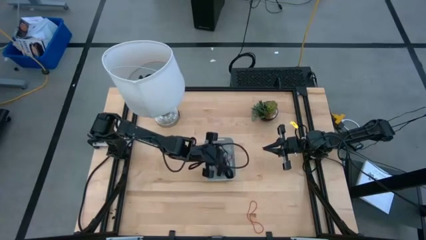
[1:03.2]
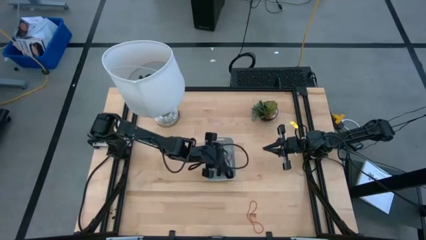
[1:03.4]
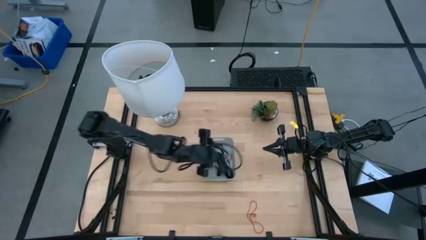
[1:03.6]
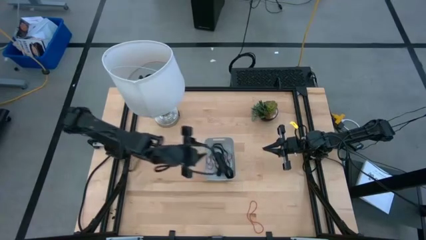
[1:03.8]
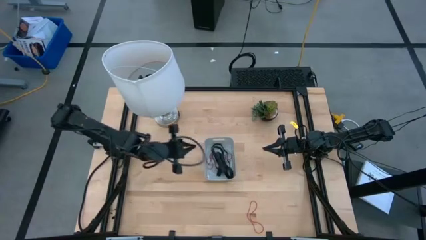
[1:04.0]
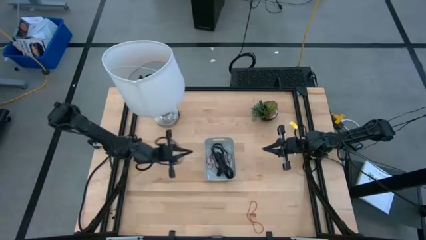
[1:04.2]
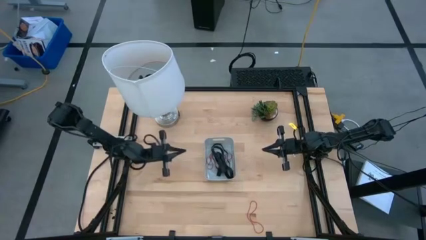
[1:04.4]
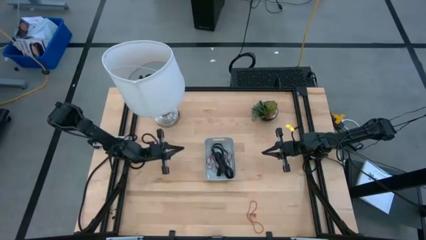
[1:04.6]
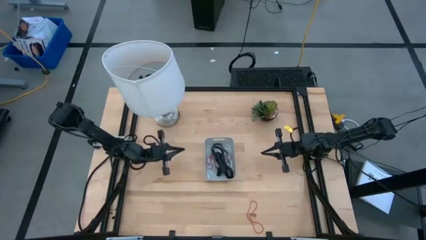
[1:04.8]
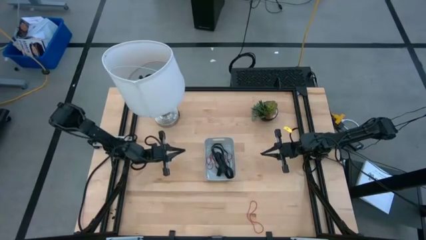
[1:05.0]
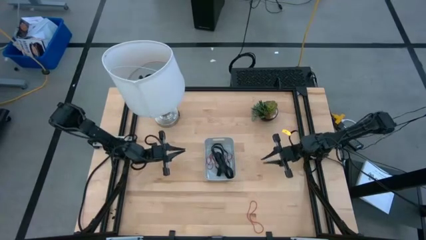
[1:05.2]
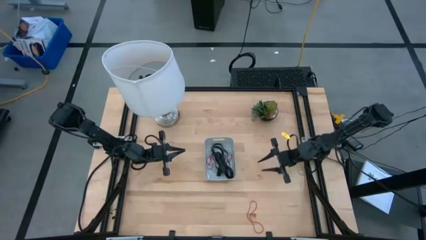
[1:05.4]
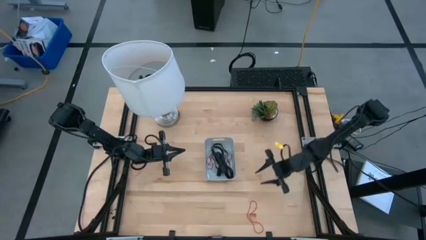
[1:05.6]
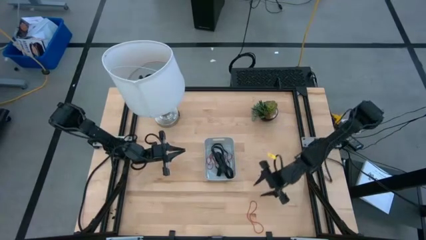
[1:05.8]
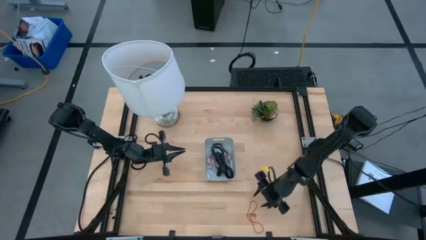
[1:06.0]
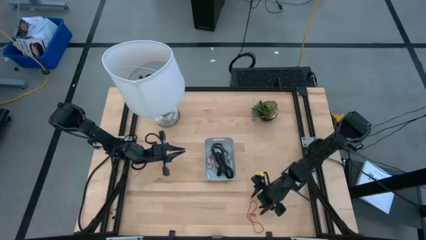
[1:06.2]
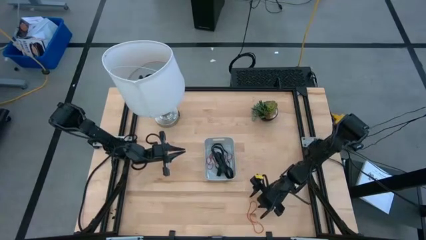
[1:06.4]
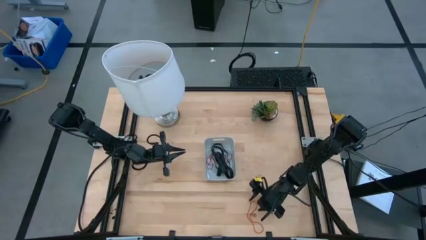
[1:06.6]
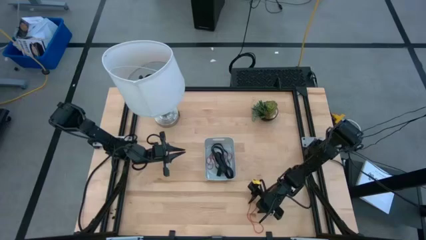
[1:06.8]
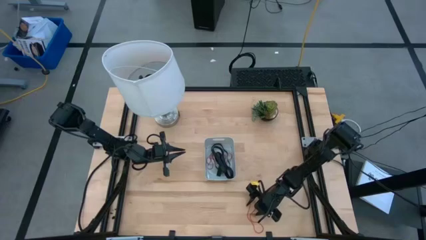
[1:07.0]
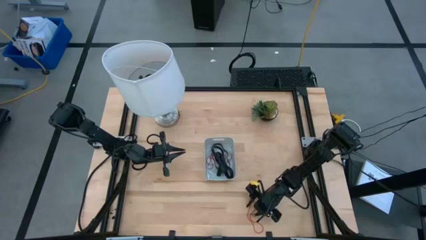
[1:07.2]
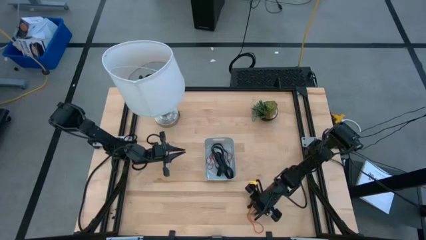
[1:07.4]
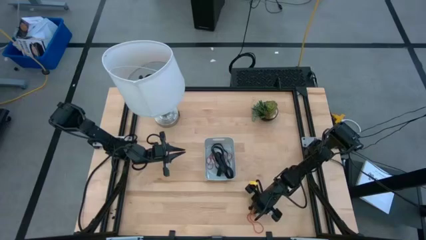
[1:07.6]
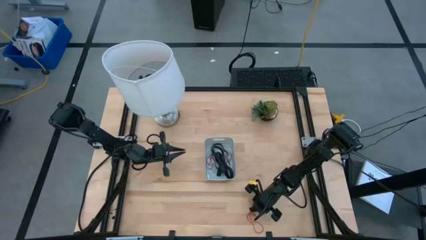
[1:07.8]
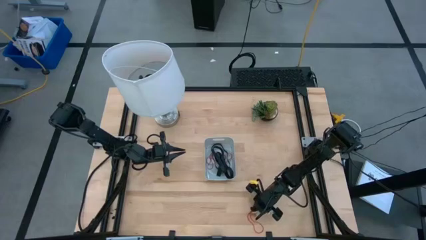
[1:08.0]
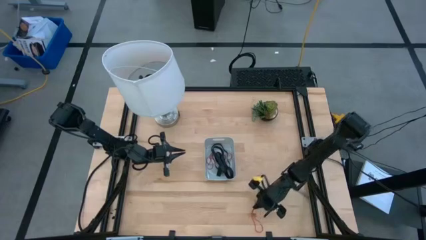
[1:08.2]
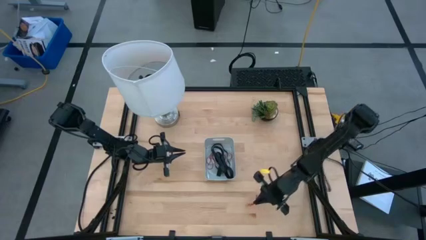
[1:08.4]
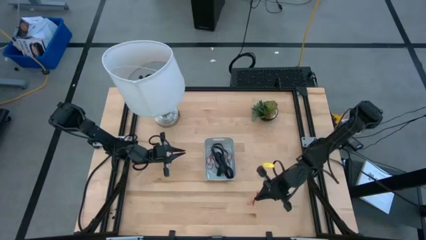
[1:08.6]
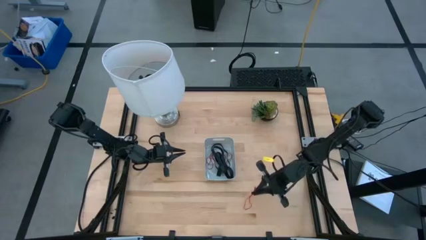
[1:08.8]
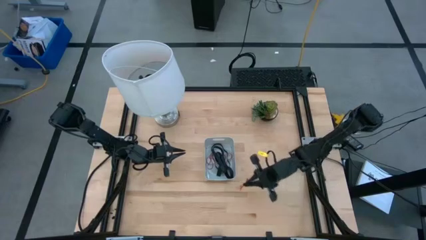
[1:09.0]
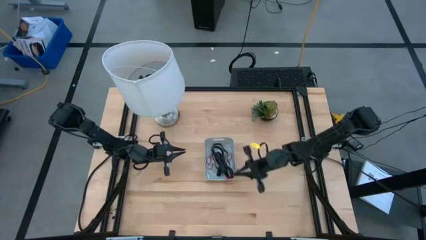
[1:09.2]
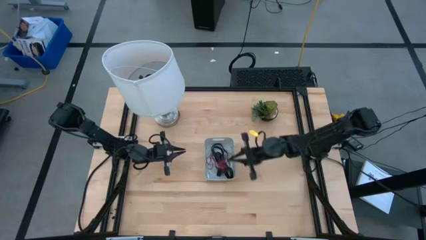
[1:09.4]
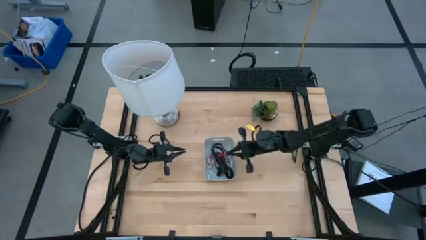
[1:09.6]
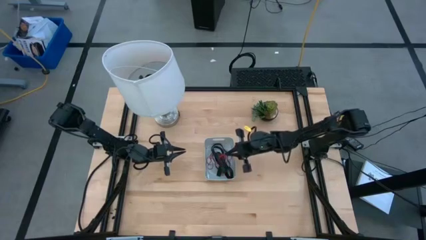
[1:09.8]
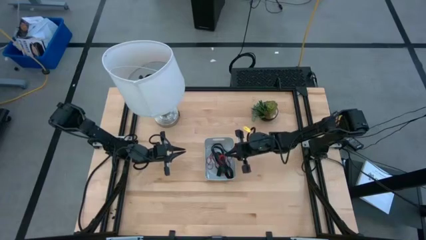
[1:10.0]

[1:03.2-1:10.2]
Task: Pick and place rubber bands into bin
Put the red rubber band into the gray bin

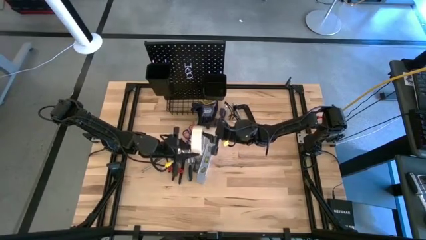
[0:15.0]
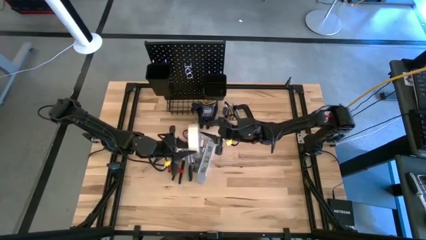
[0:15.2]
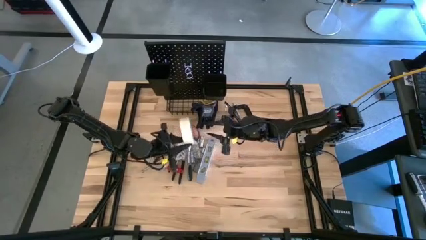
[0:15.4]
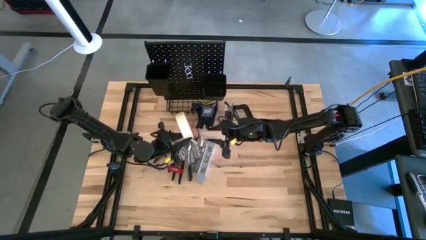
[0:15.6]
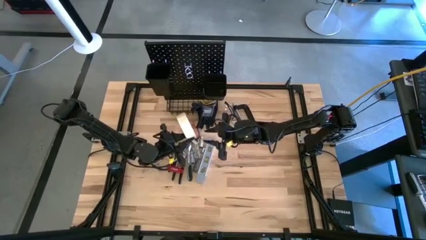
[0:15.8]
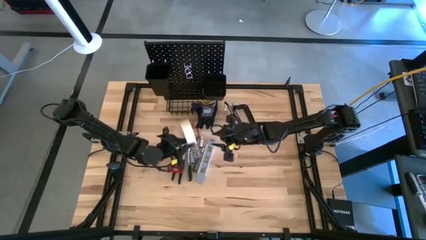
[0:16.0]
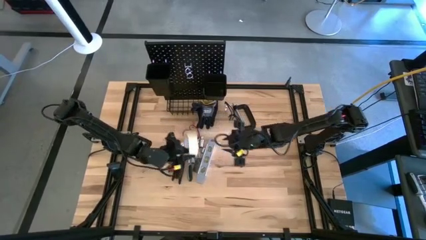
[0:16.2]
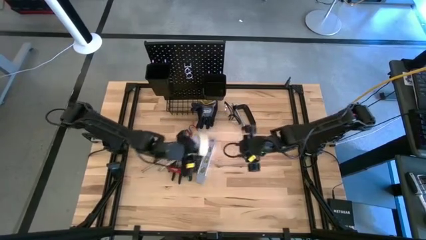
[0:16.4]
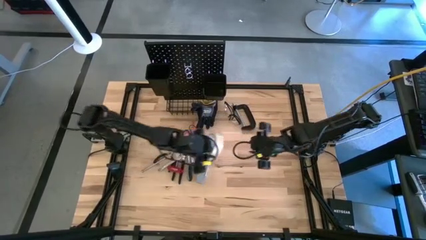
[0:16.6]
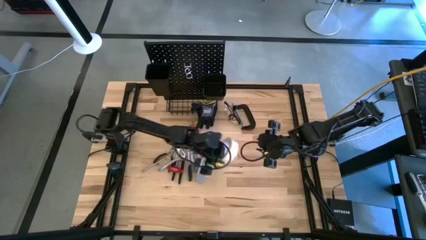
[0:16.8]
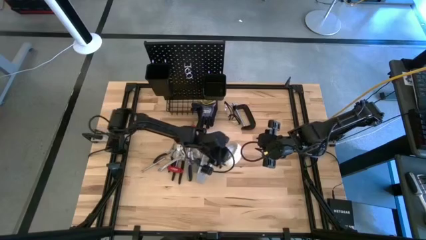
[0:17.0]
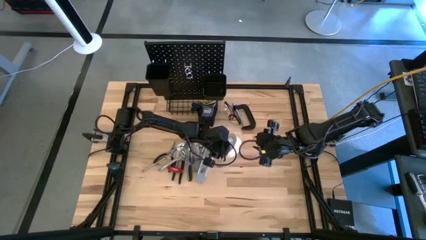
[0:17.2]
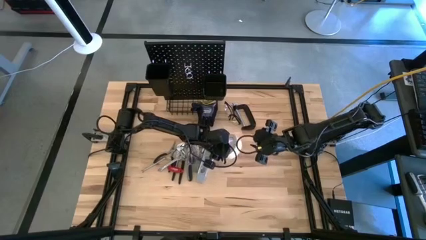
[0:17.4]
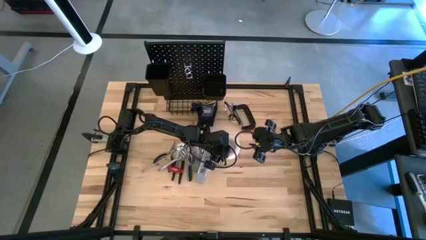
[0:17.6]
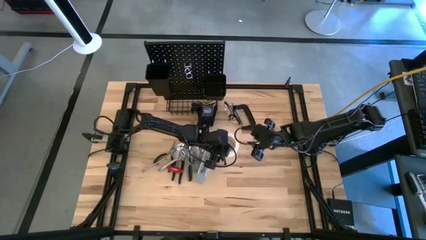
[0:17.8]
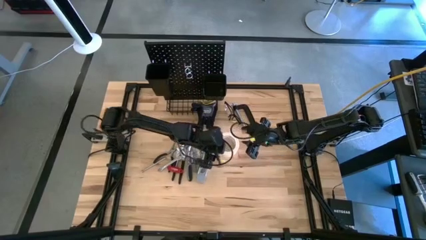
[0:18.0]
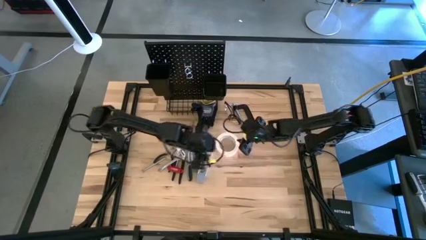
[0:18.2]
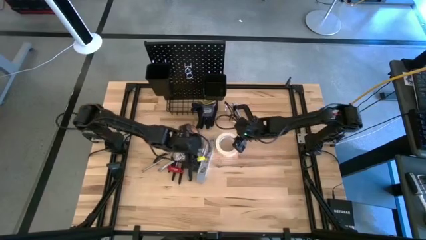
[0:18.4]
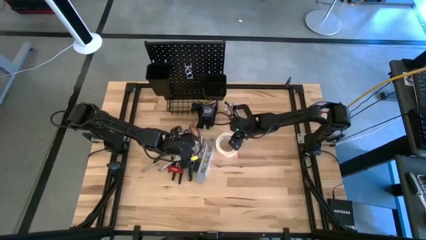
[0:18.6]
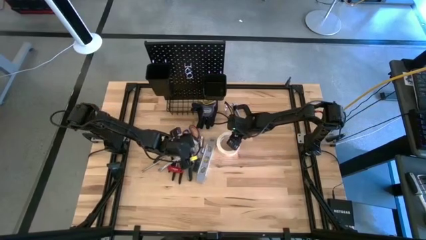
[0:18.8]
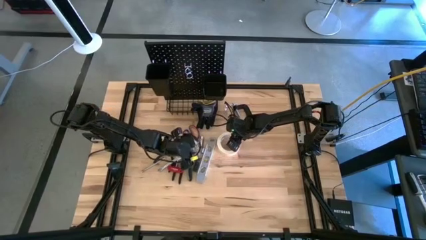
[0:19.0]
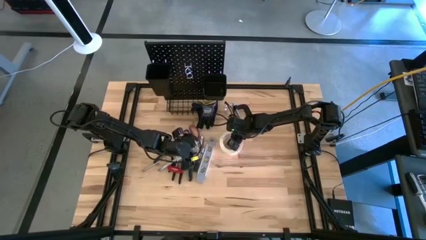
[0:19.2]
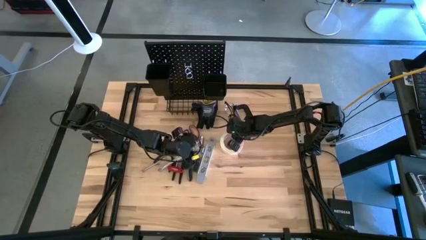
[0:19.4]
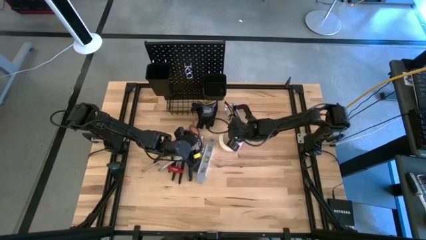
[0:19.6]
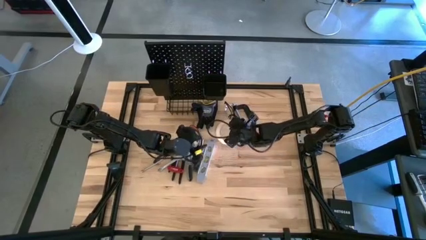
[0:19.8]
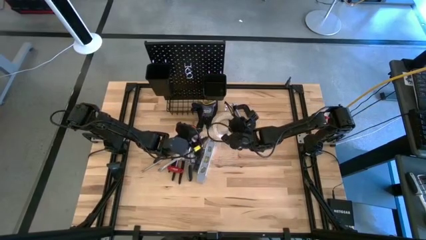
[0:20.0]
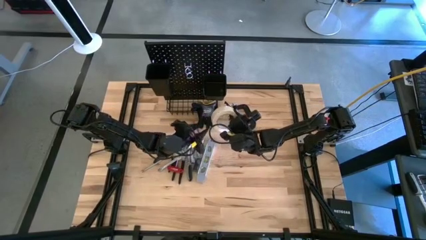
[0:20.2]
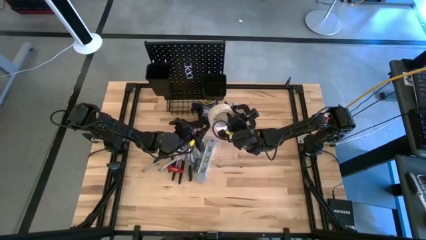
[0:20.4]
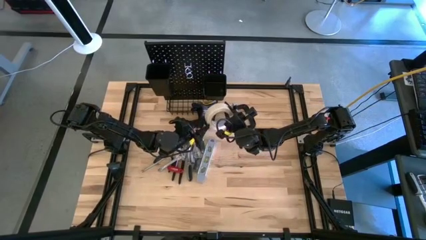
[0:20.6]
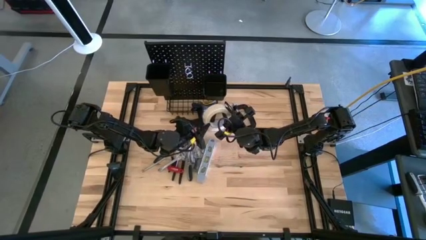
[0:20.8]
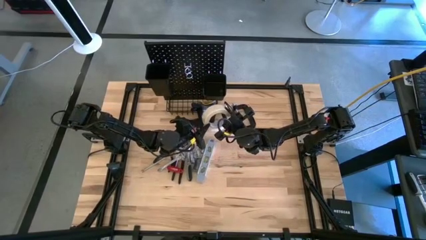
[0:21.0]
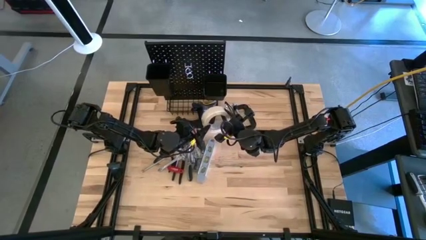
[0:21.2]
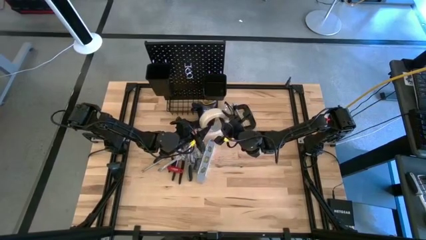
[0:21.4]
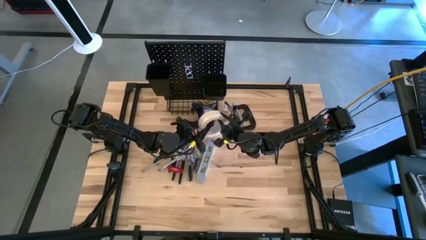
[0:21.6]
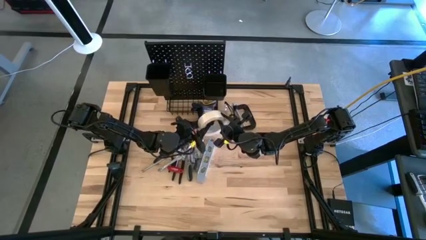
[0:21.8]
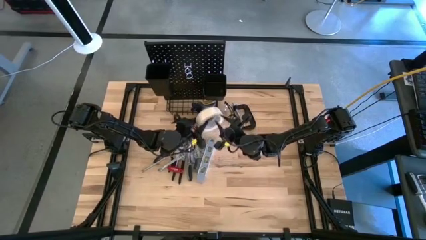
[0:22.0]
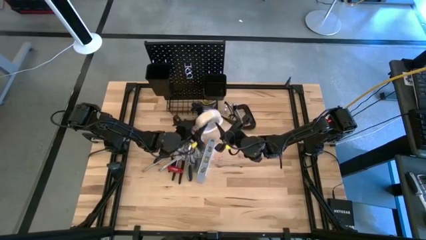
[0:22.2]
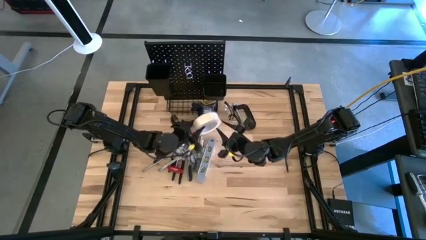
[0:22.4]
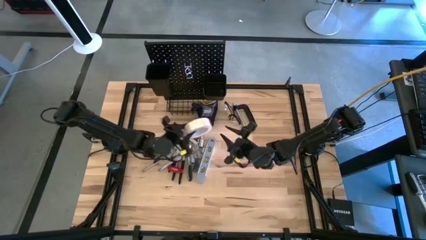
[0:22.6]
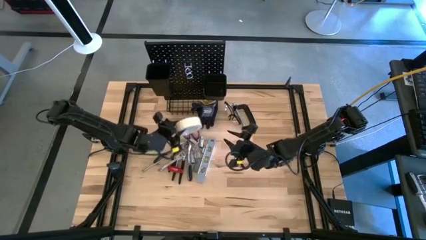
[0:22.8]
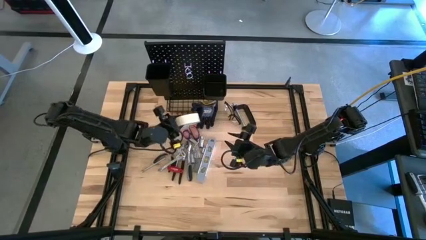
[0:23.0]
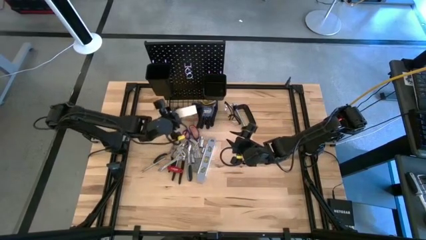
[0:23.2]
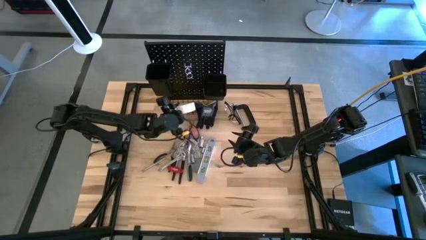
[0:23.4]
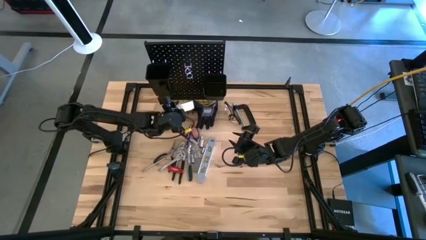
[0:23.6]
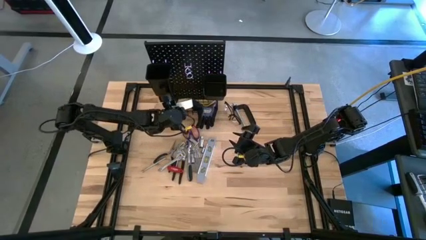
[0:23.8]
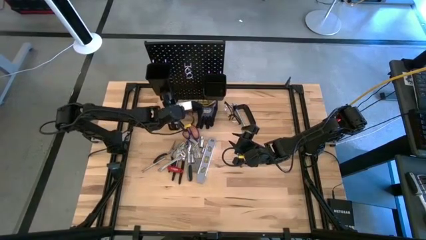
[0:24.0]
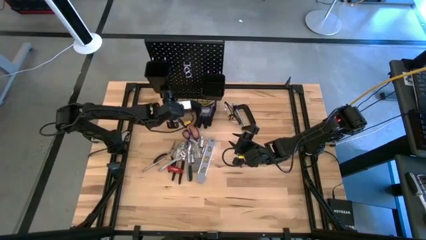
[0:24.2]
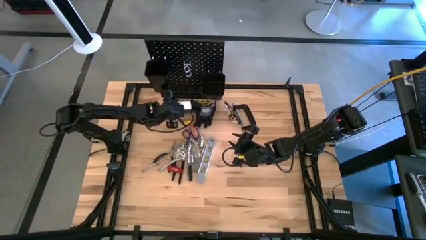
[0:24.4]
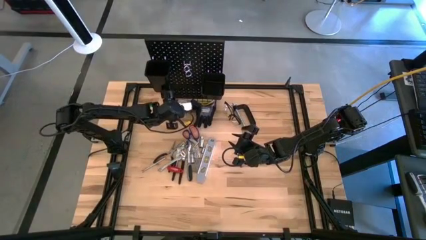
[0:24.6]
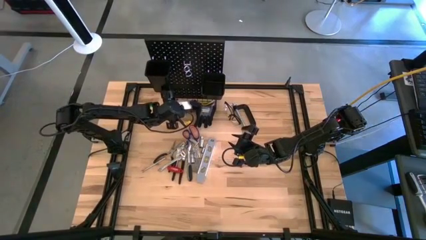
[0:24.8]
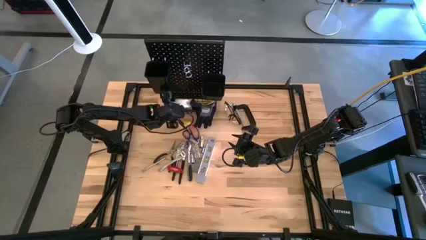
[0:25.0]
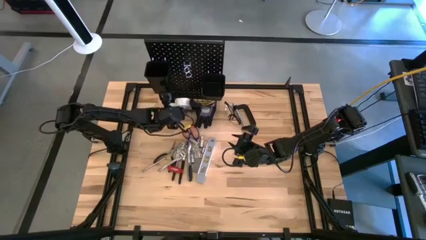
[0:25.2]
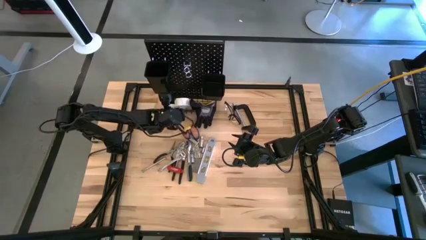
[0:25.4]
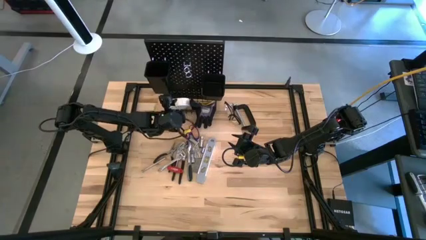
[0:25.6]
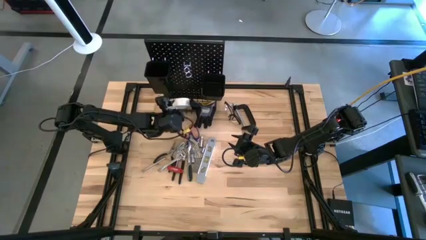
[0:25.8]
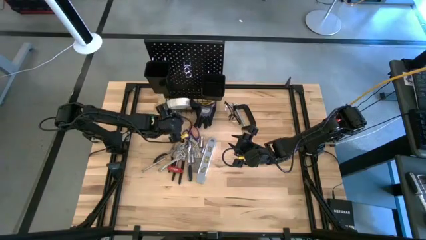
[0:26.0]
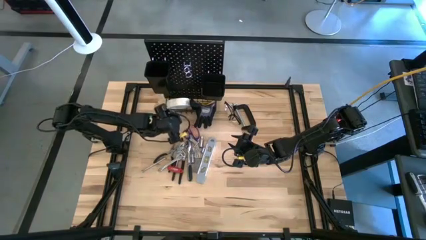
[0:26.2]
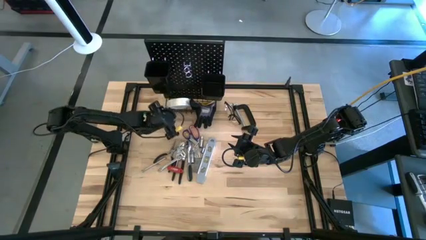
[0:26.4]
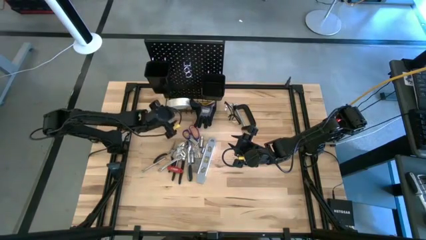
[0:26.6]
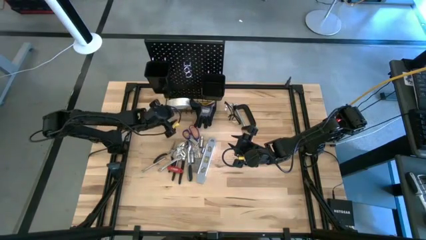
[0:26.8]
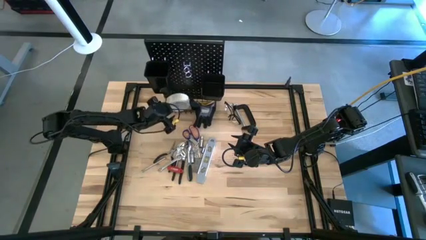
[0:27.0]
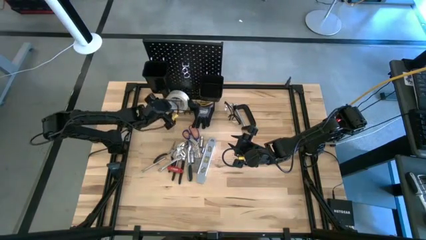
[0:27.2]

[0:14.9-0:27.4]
Task: Hang tools onto peg board
Put the masking tape into the wire basket on the pegboard
